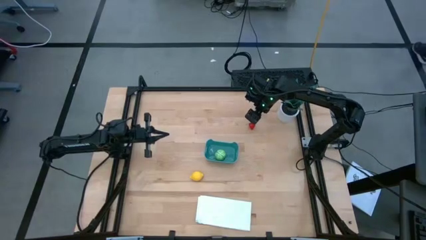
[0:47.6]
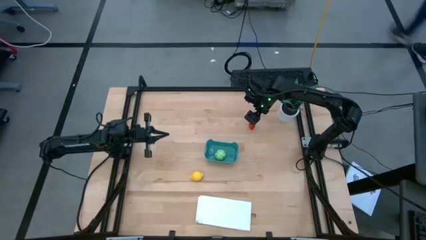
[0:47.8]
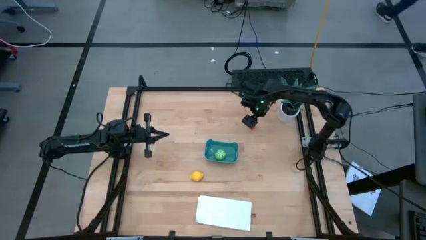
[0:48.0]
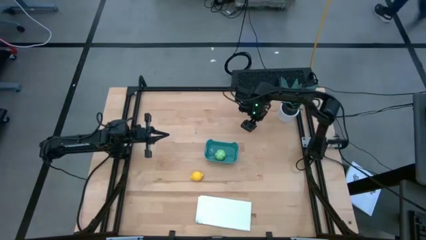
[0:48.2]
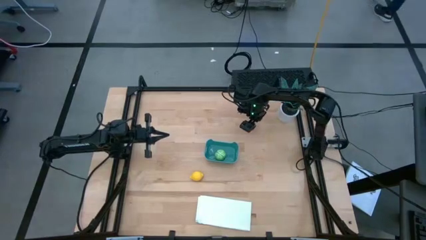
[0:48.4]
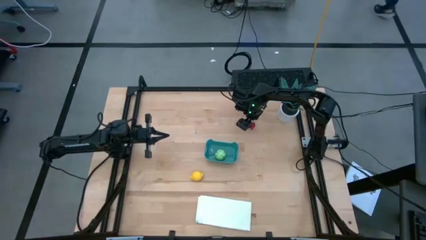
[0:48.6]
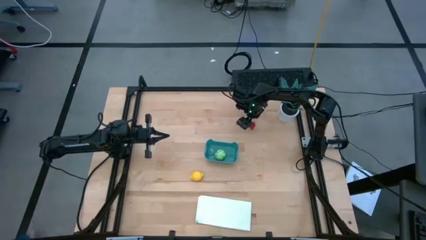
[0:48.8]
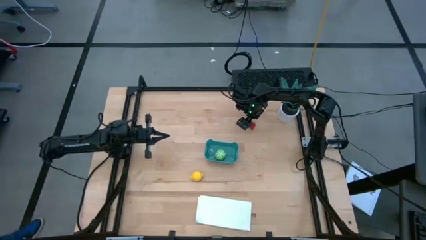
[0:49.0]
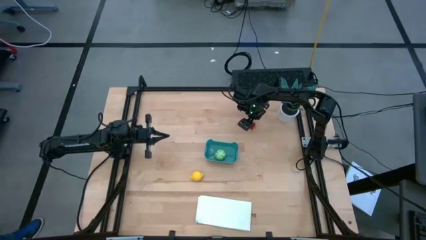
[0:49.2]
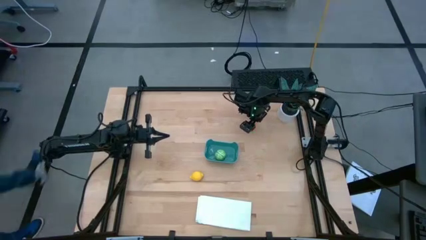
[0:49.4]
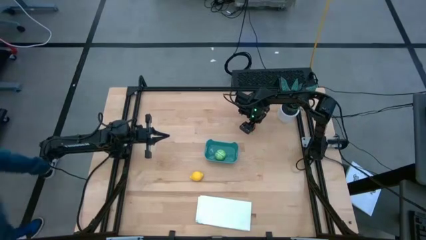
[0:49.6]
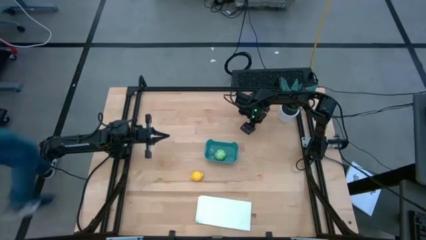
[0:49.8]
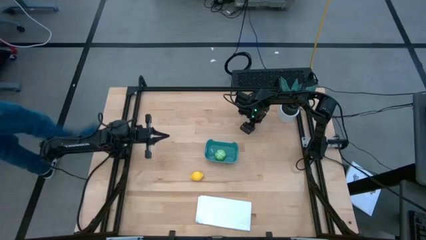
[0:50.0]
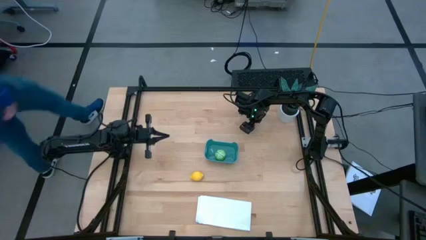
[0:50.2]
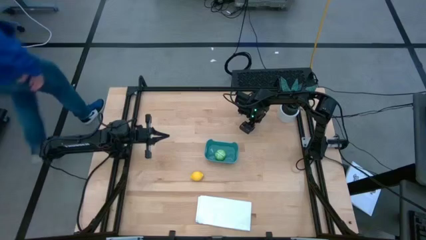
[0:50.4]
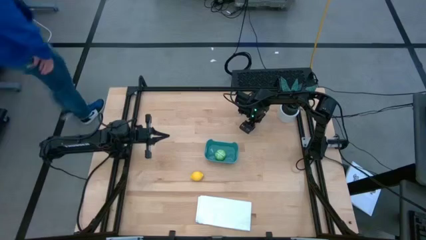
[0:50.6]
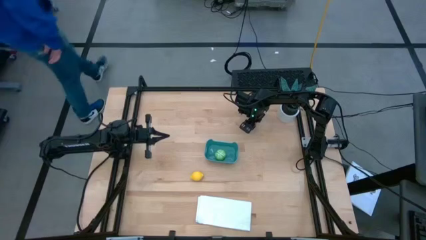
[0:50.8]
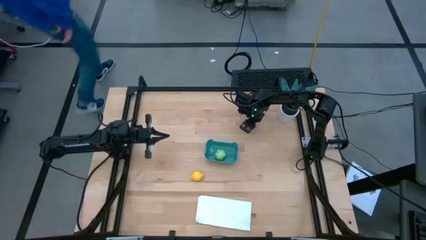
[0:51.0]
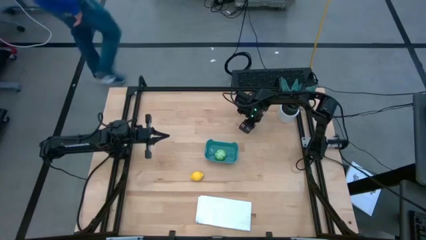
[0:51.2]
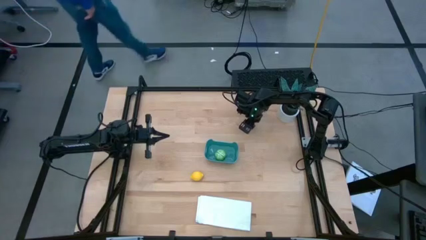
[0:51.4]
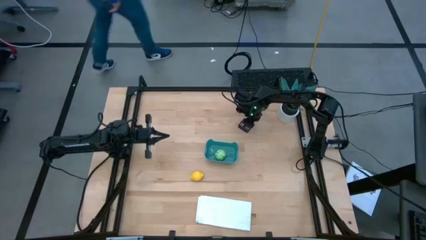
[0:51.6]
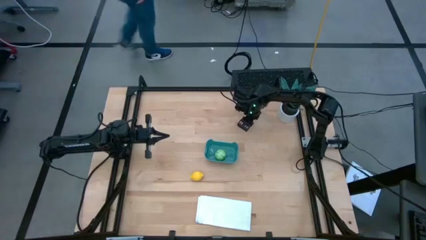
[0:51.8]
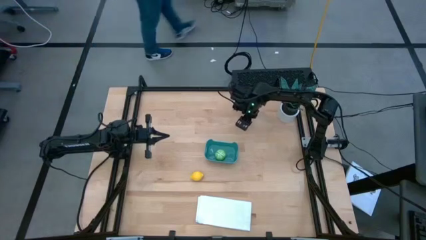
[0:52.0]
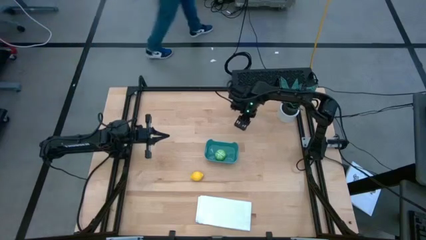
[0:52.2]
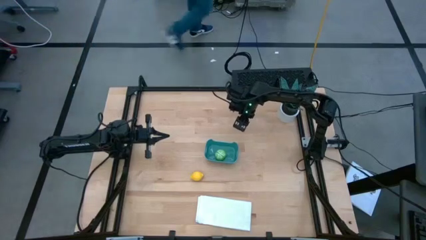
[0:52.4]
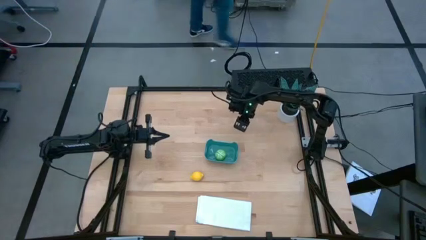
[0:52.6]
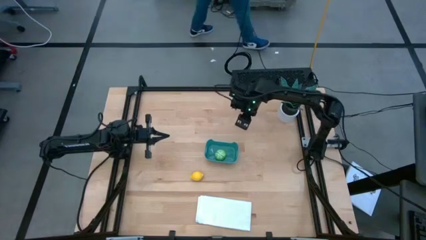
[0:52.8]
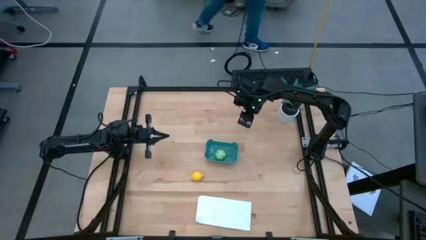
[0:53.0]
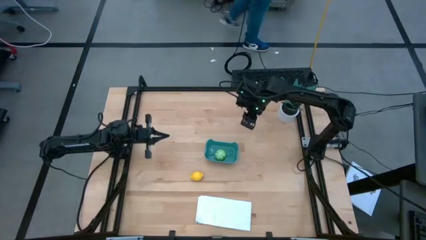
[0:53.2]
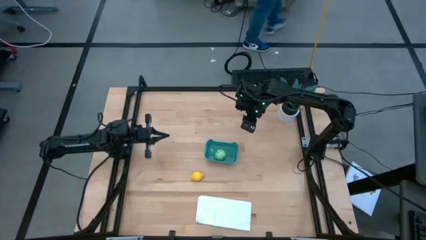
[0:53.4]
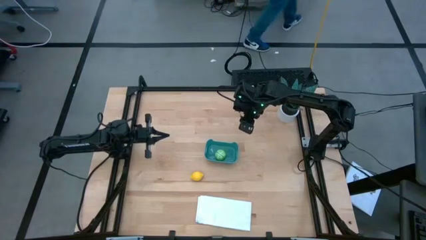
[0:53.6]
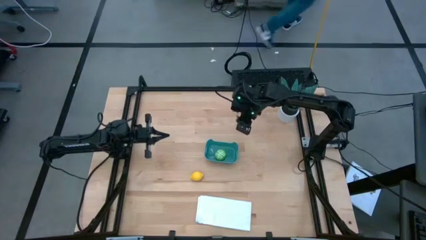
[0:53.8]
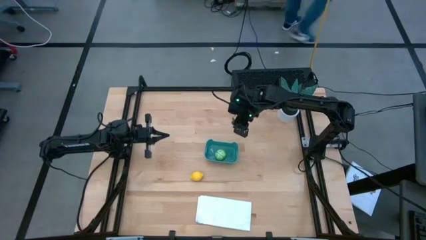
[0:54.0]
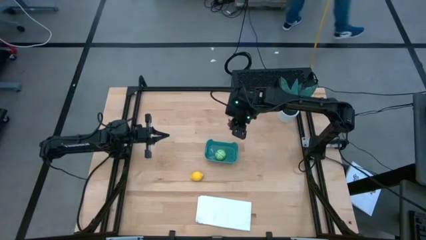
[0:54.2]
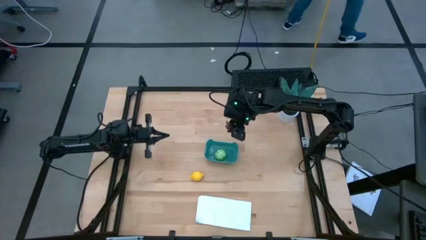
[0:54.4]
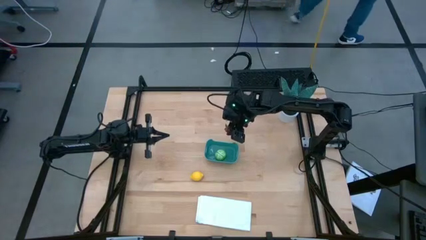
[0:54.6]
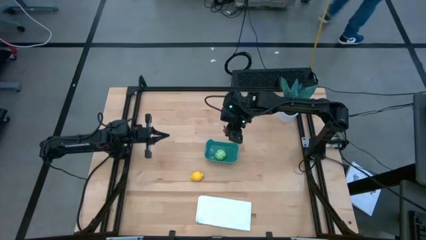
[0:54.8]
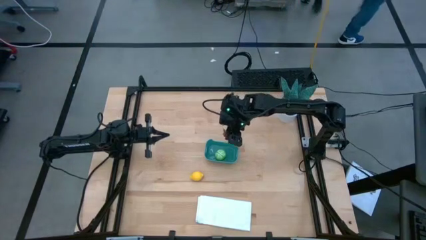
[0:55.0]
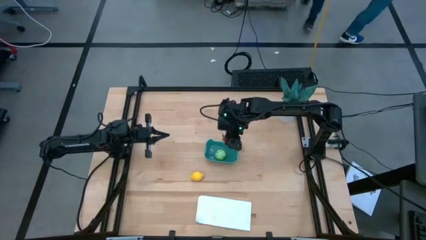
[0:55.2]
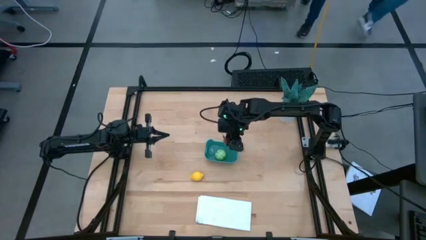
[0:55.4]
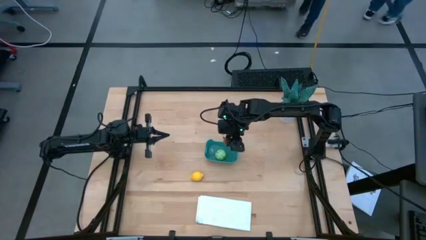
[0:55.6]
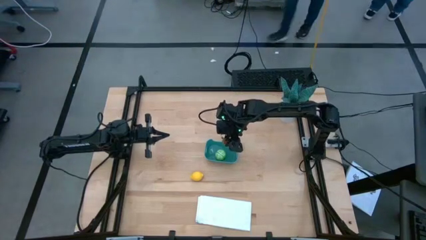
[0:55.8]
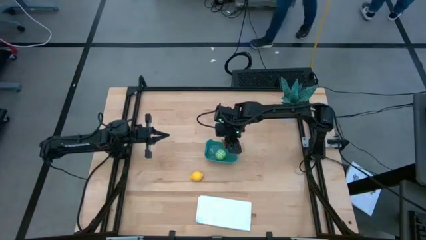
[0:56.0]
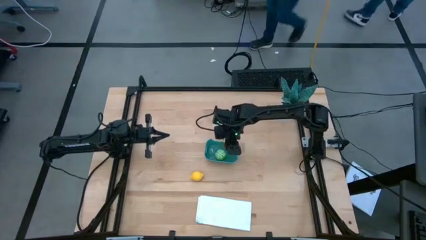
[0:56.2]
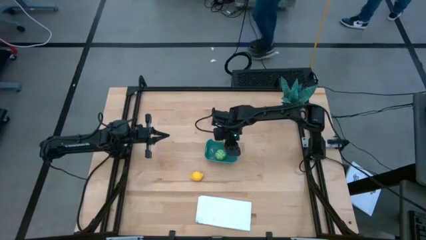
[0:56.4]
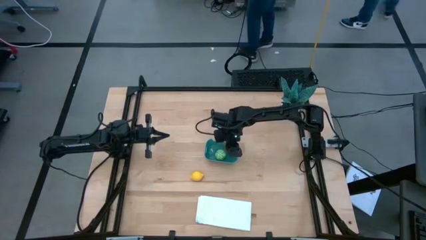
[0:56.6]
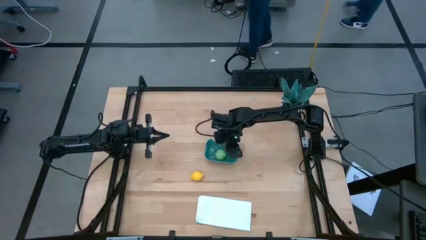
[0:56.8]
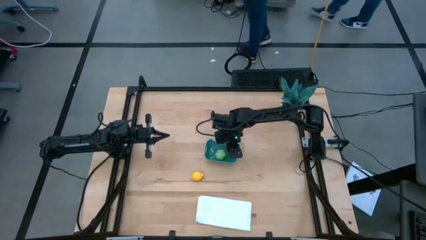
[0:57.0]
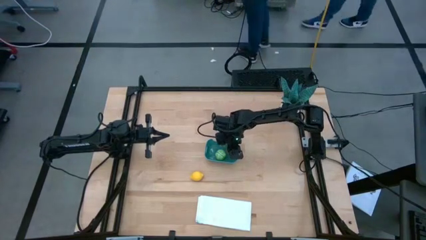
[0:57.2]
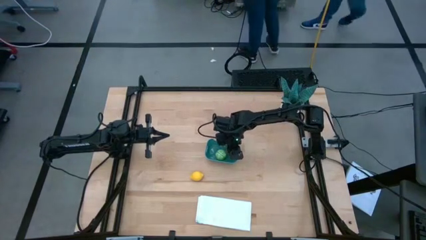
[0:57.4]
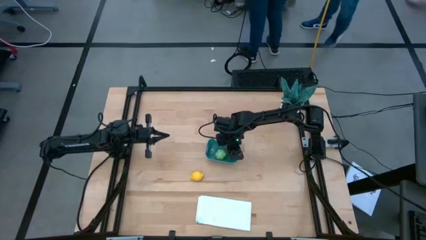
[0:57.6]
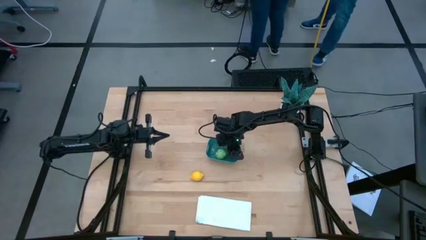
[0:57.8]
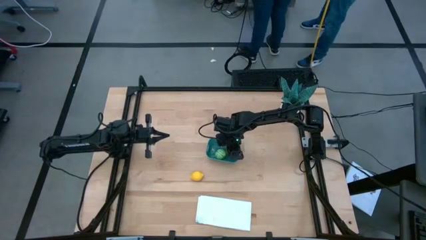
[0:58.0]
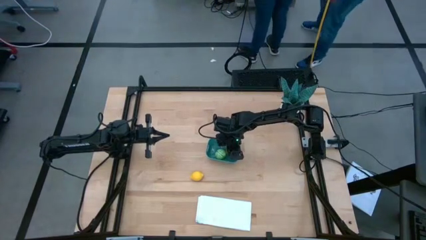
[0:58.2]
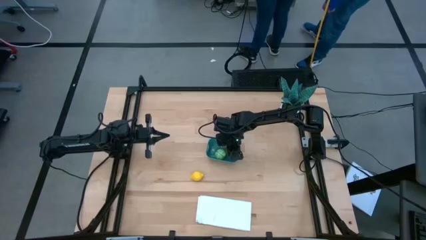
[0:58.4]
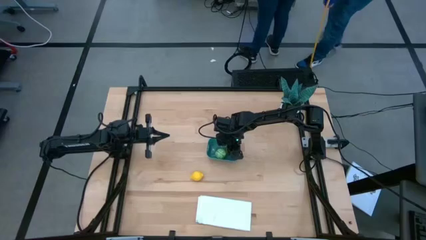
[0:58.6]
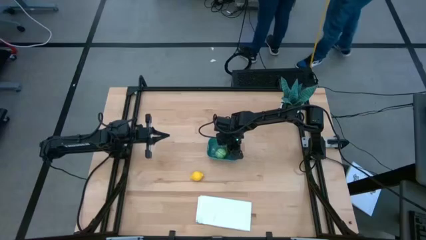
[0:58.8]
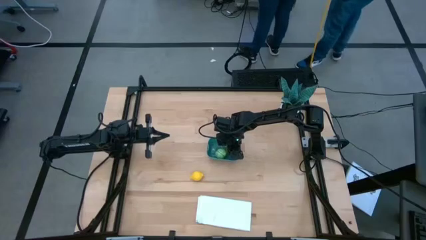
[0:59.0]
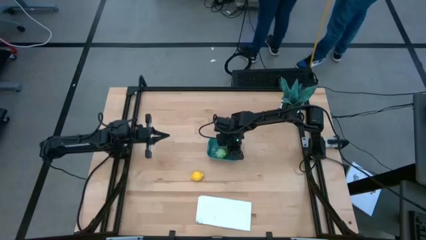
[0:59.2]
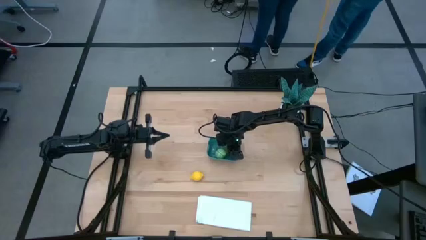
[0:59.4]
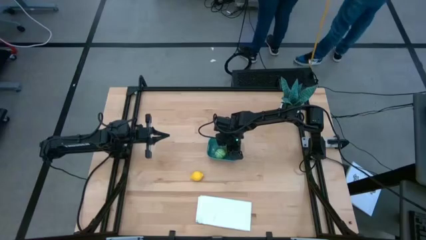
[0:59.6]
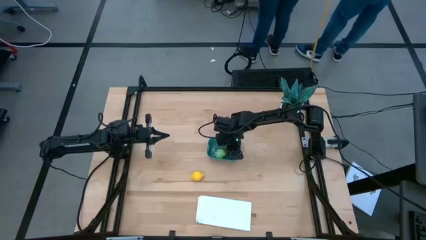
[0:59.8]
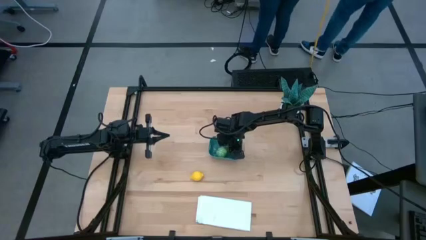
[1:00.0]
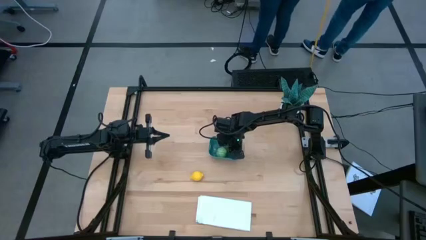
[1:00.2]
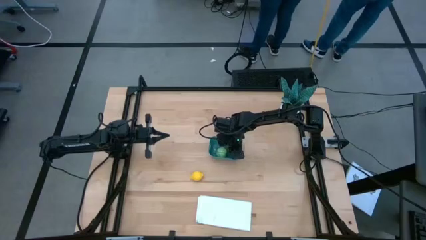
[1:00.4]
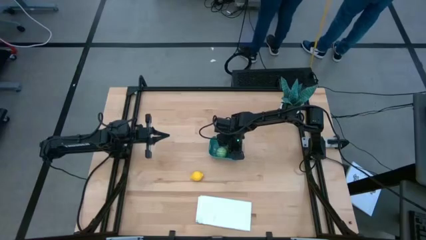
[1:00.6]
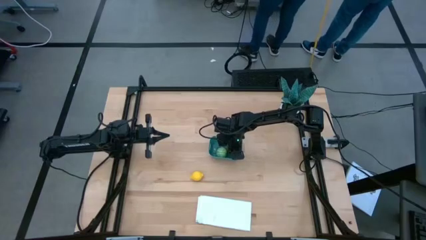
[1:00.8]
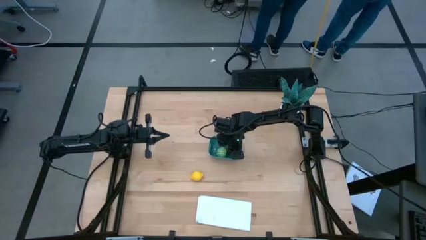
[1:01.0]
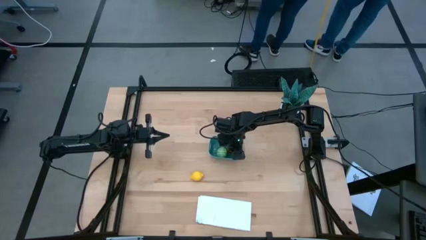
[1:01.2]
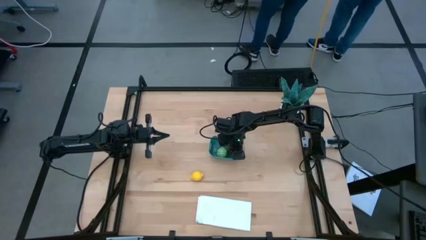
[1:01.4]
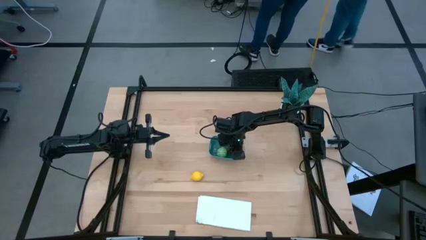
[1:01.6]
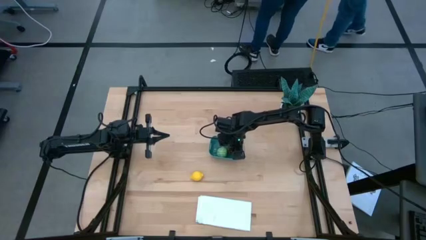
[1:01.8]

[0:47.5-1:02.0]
Task: Pick and placing Produce into tupperware
Put the red strawberry into the blue bin
